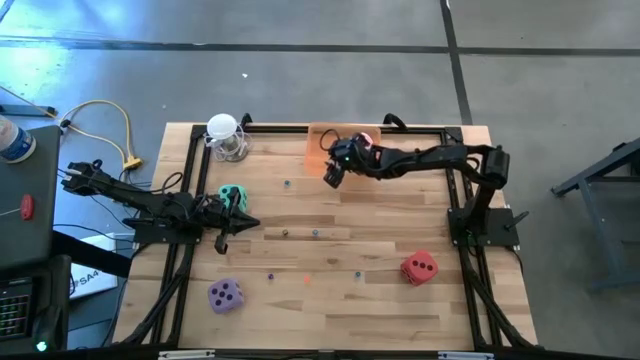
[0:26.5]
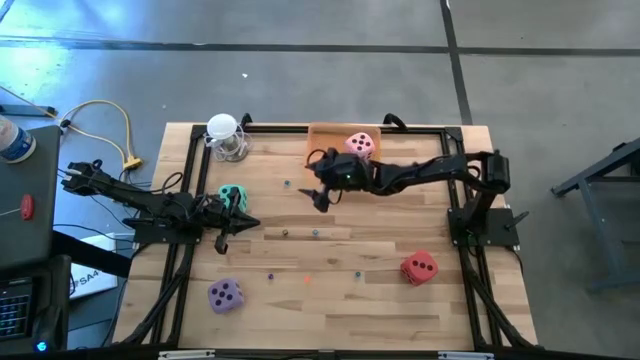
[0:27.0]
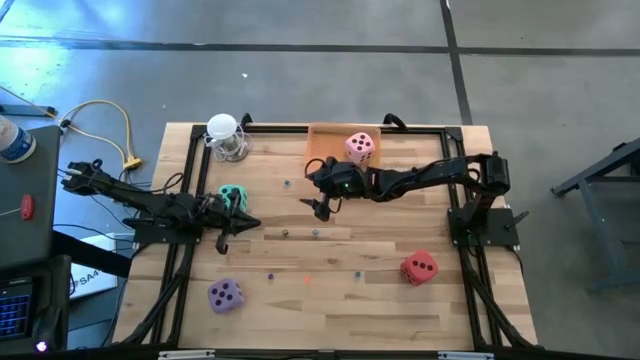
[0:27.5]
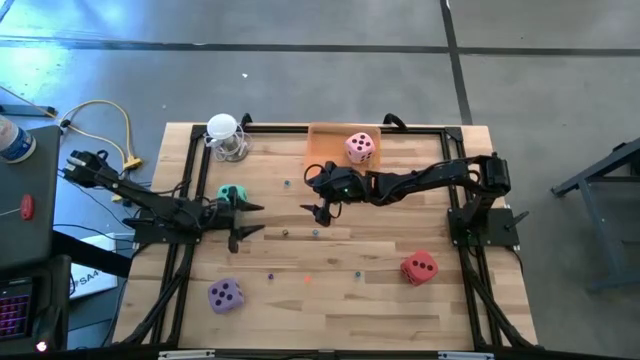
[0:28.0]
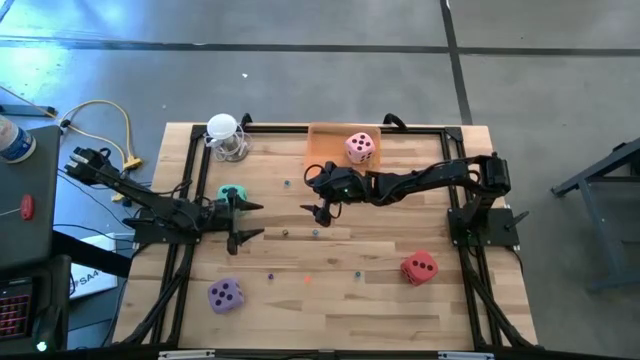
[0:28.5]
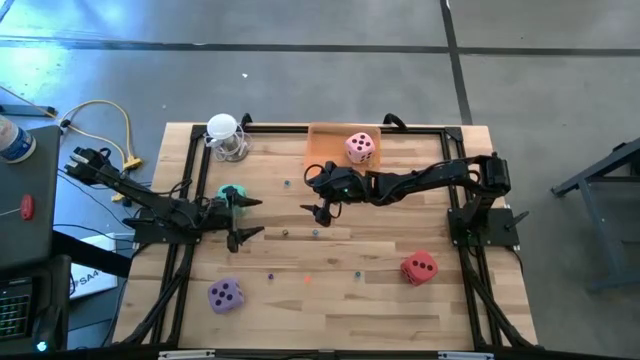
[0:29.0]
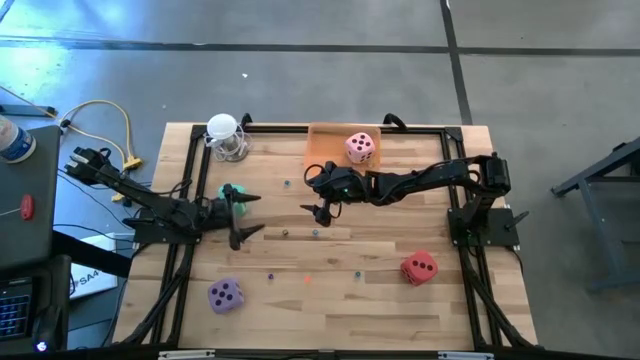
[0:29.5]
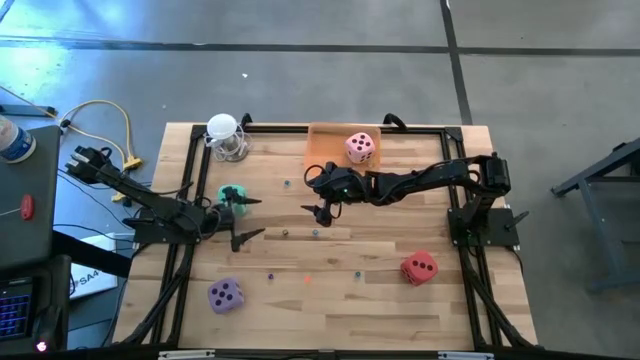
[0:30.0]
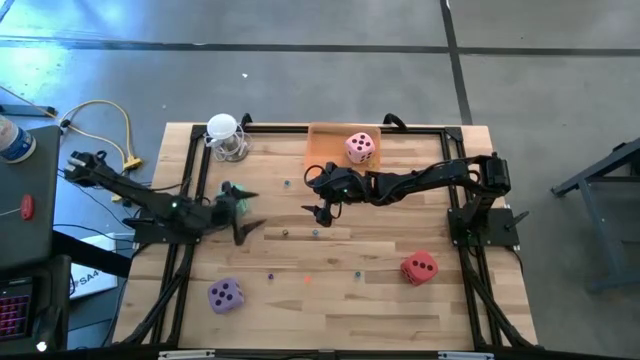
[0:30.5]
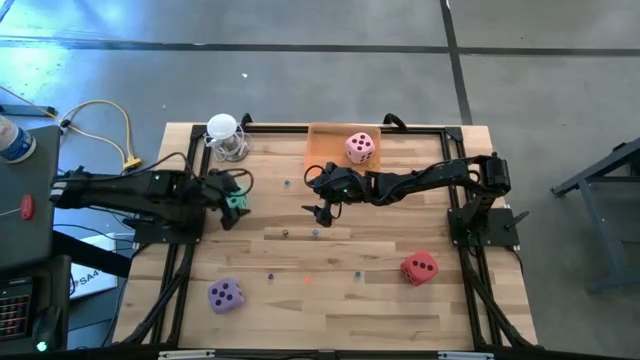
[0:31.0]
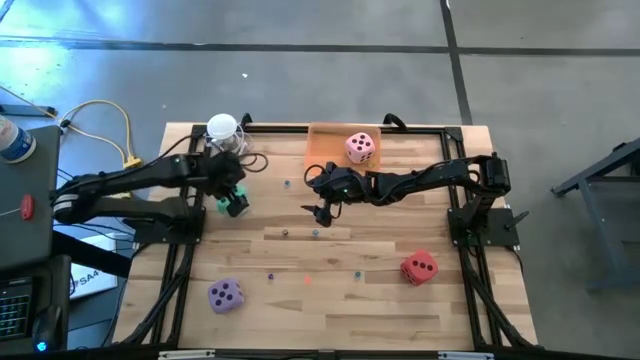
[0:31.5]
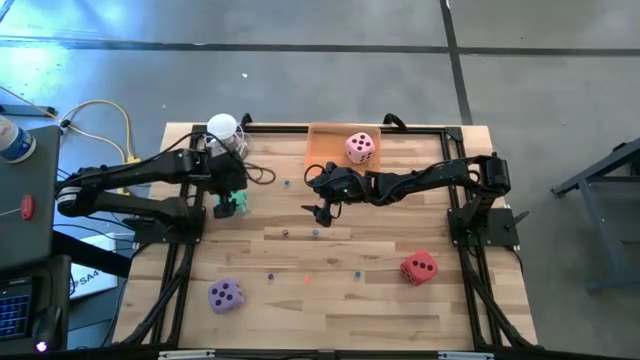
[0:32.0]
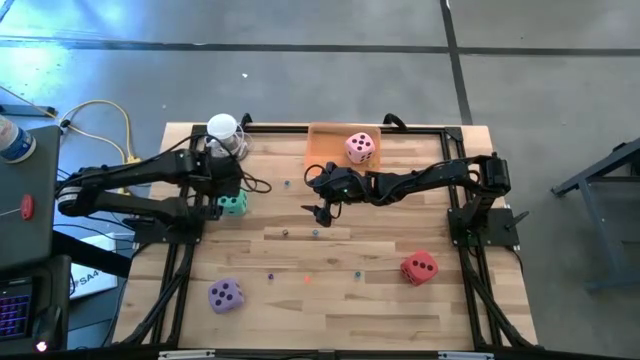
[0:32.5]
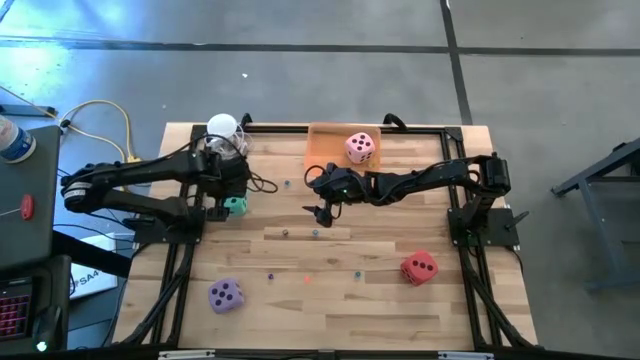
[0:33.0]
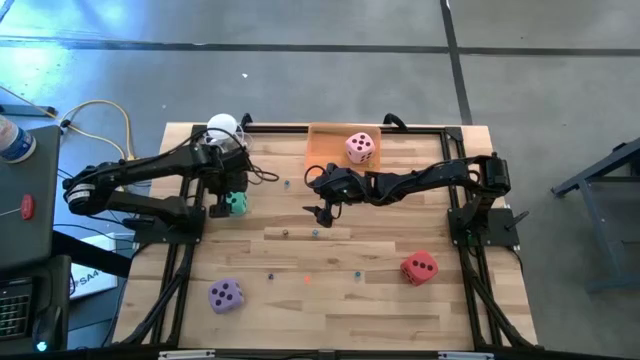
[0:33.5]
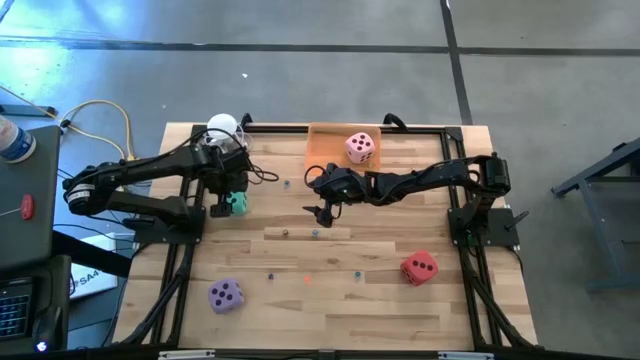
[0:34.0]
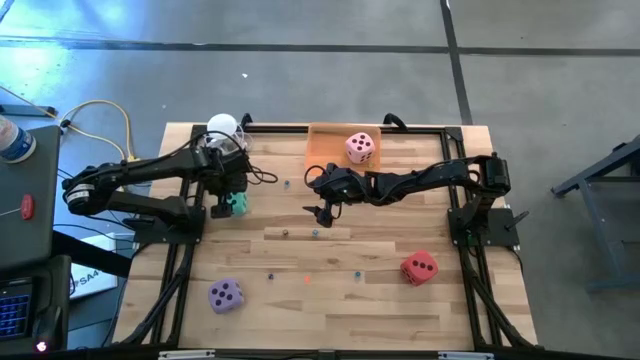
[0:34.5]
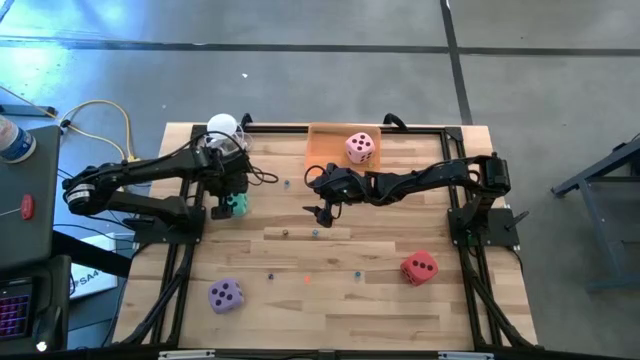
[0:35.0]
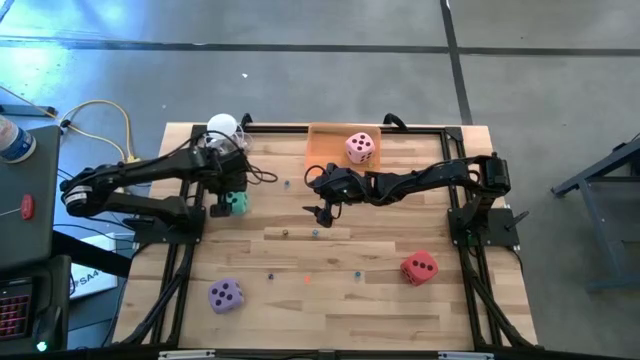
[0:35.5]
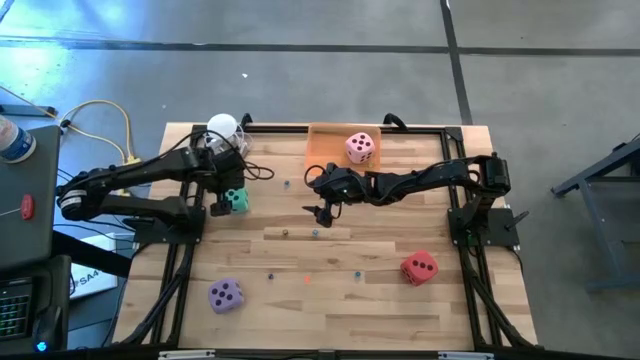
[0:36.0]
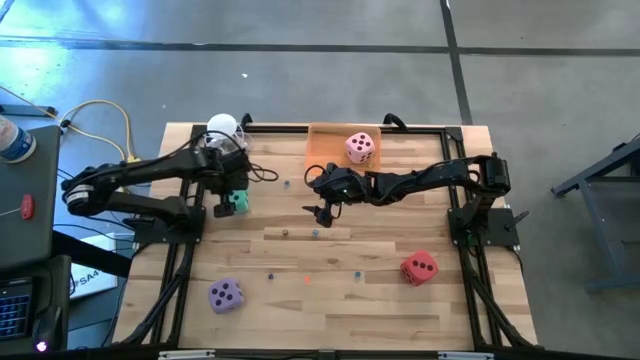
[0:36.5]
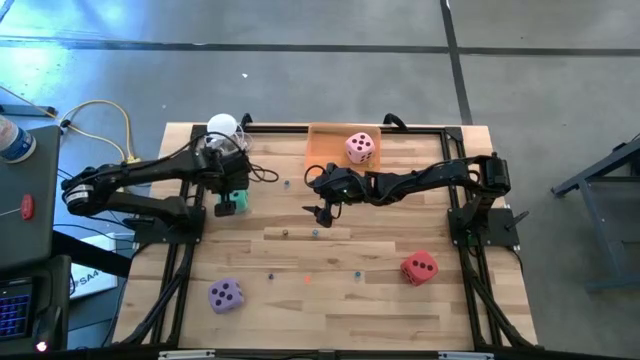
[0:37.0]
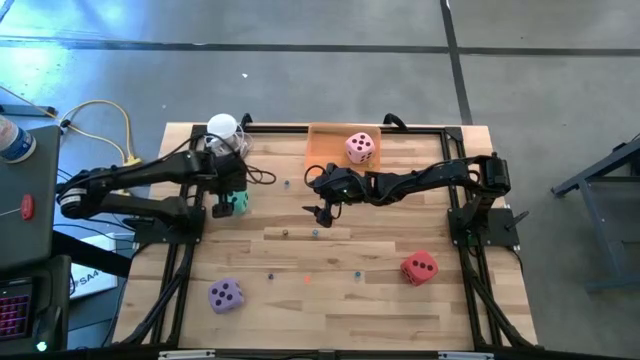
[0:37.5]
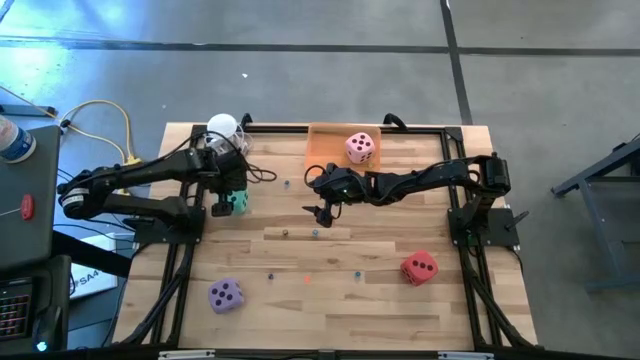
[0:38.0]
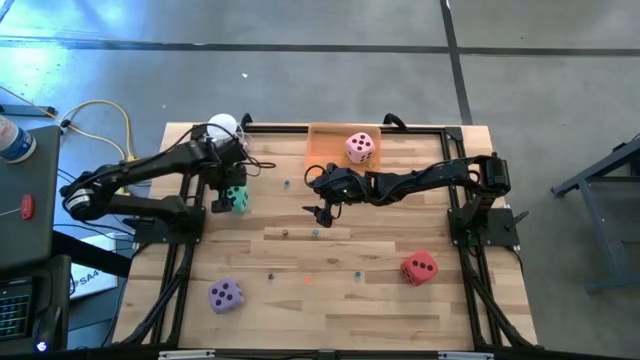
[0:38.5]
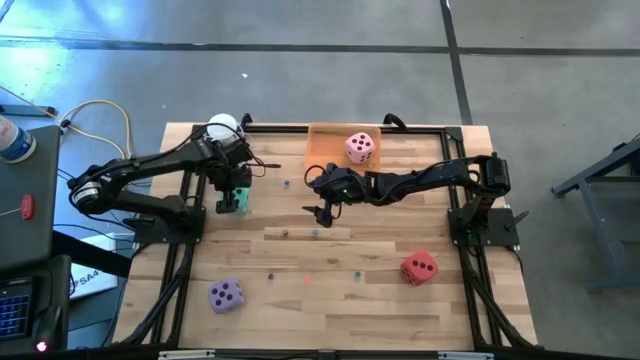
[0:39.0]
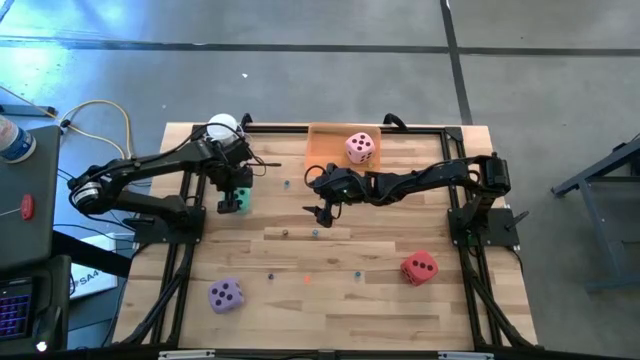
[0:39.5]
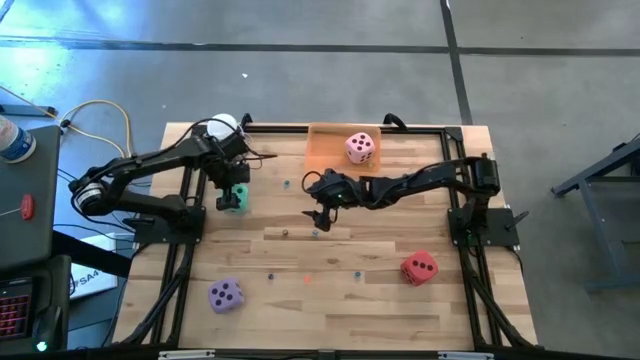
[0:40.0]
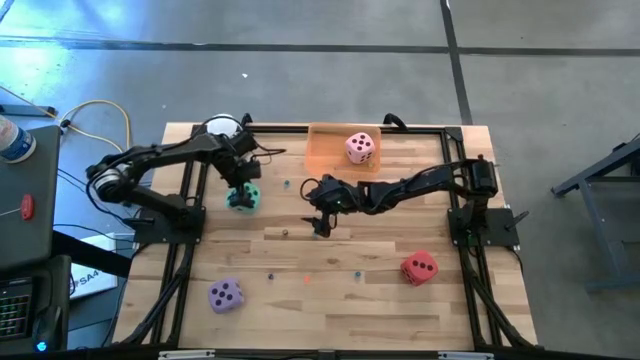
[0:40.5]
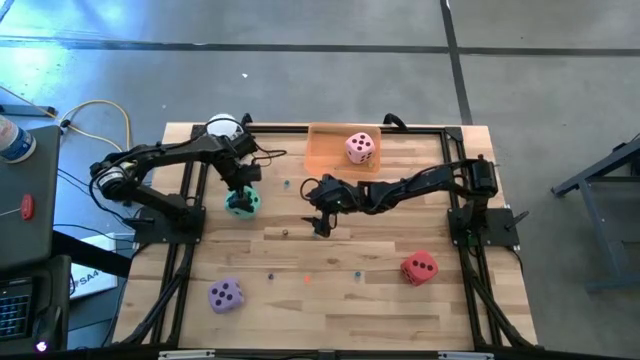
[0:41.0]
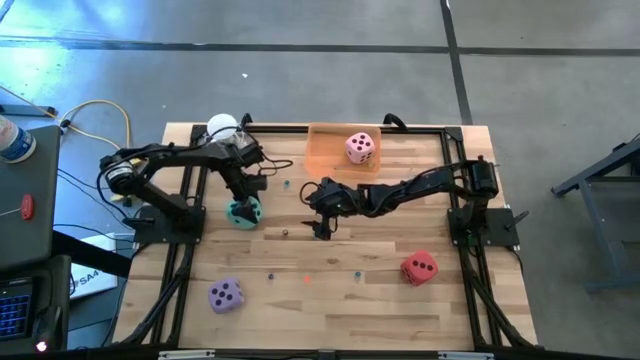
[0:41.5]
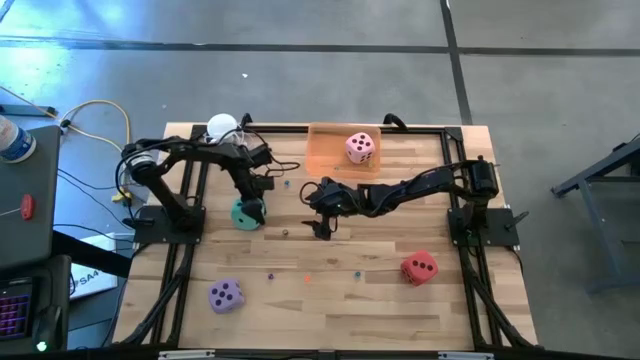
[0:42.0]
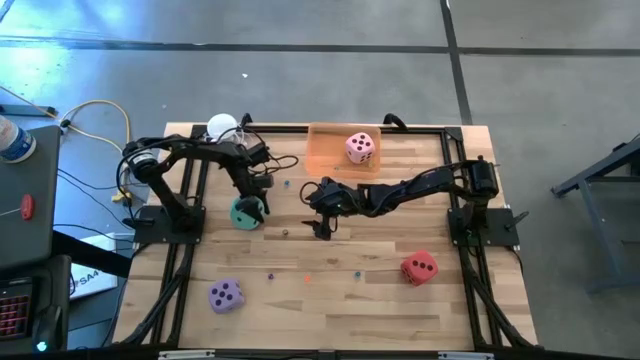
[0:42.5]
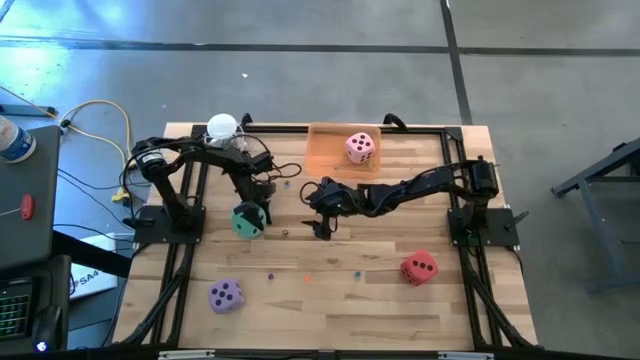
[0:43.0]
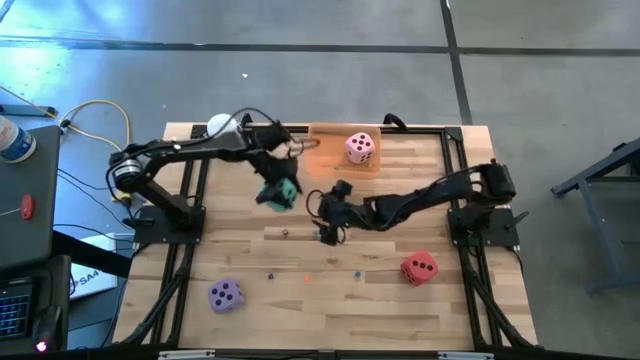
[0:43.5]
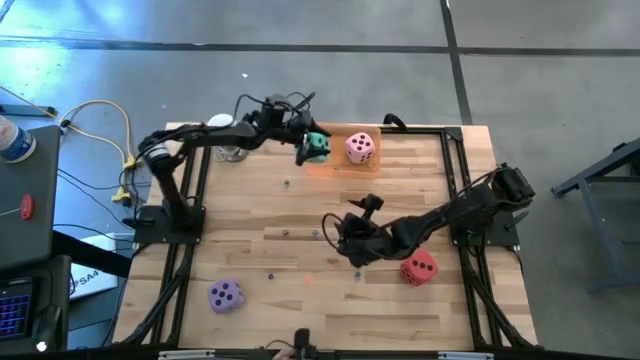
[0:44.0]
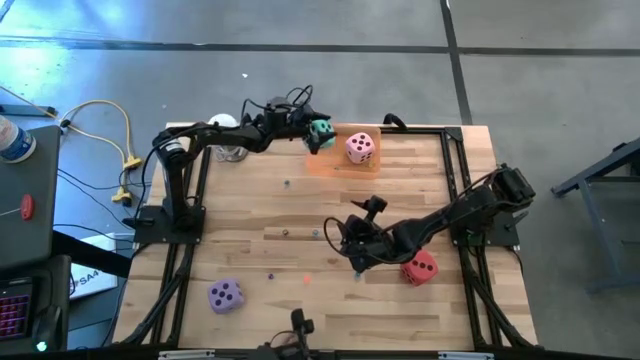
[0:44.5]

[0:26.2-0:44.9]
Task: Pick & Place Dice
Put the large light blue die into the orange bin

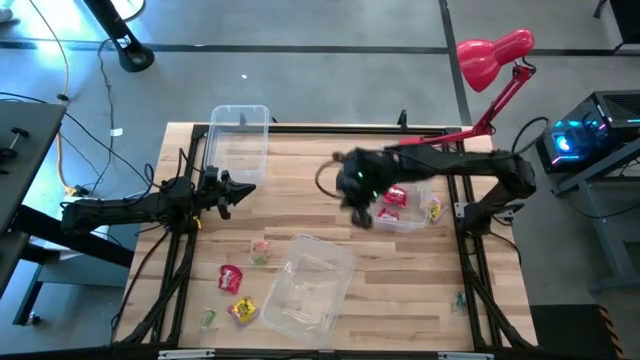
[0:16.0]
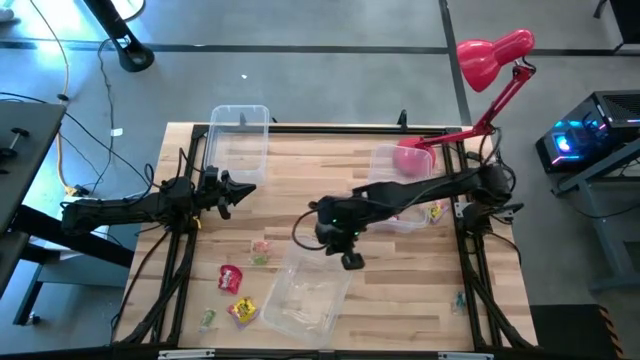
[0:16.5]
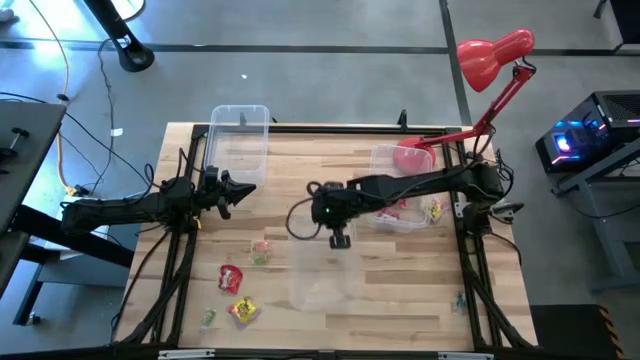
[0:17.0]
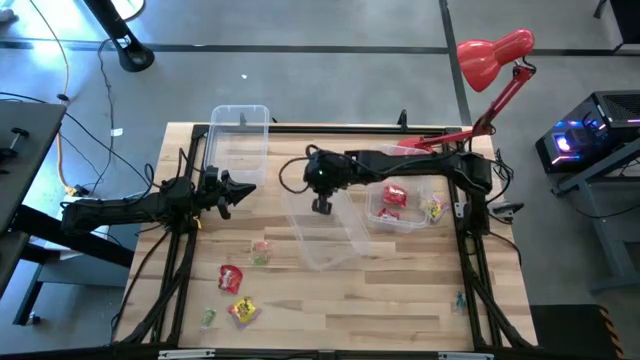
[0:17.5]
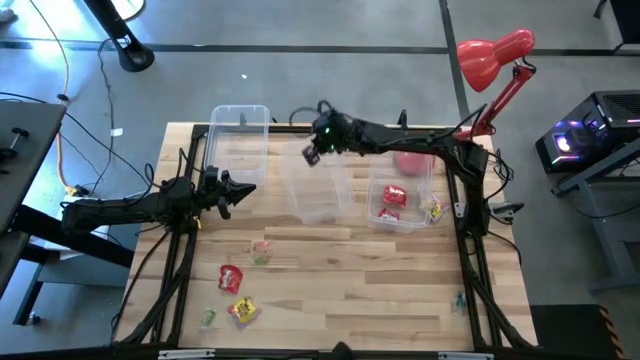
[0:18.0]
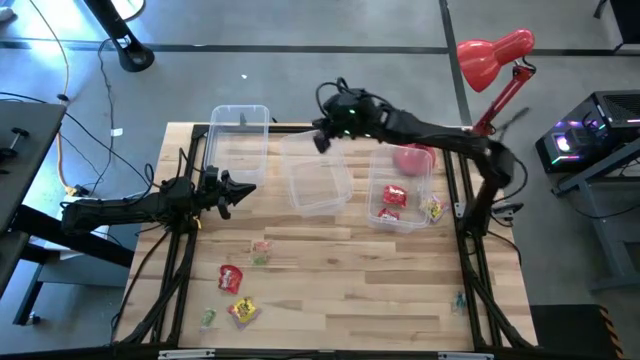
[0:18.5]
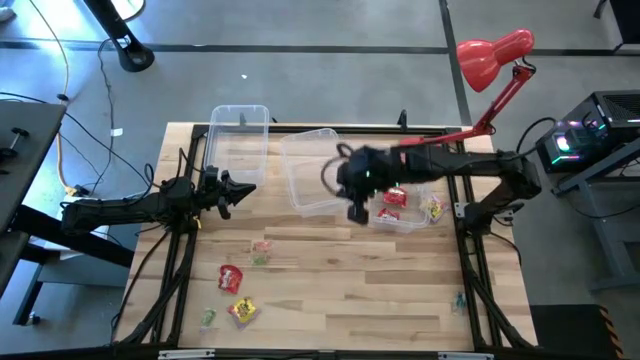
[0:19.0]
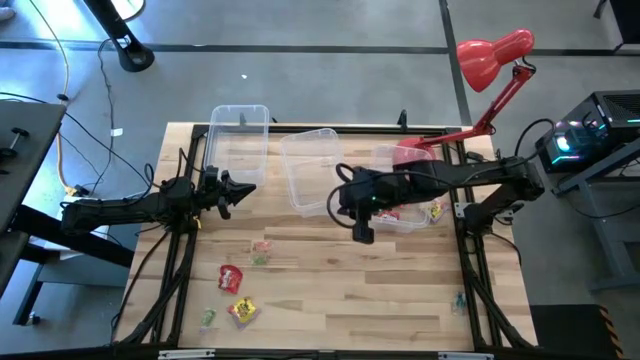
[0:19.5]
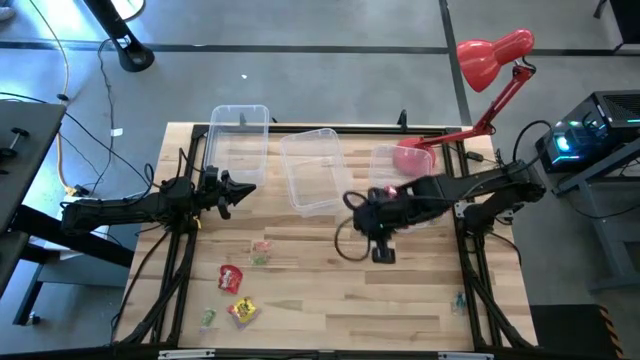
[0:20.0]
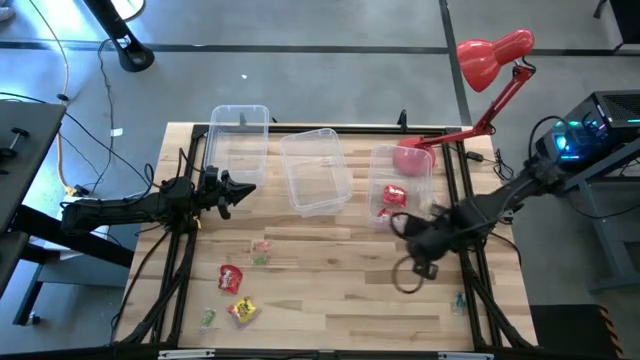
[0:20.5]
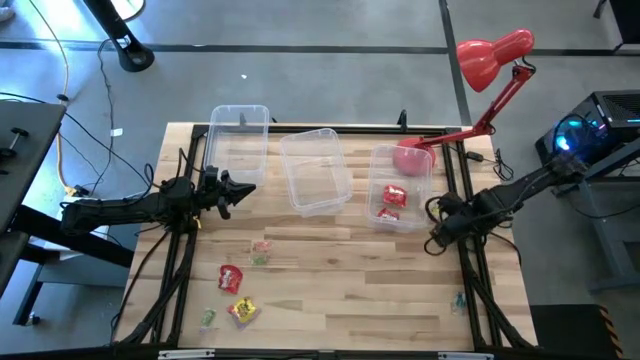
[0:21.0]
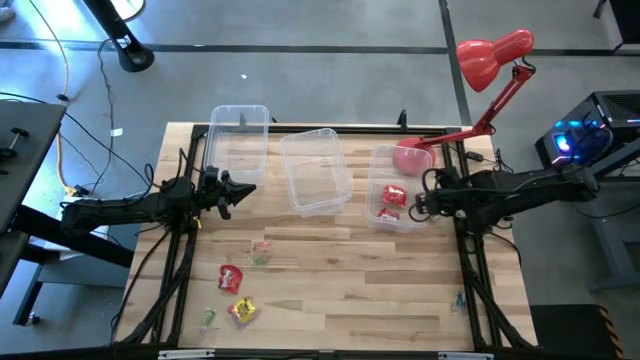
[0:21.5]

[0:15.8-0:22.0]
Task: Sort candy
Move the transparent bins to the top of the table
